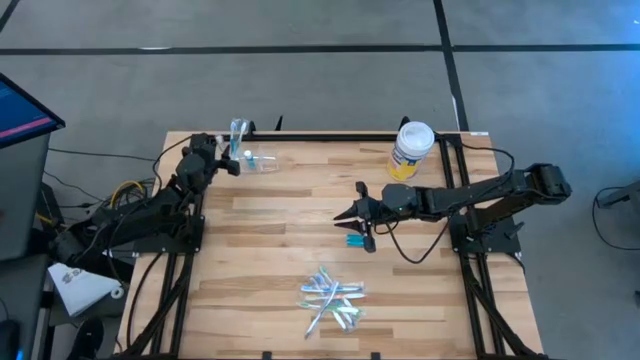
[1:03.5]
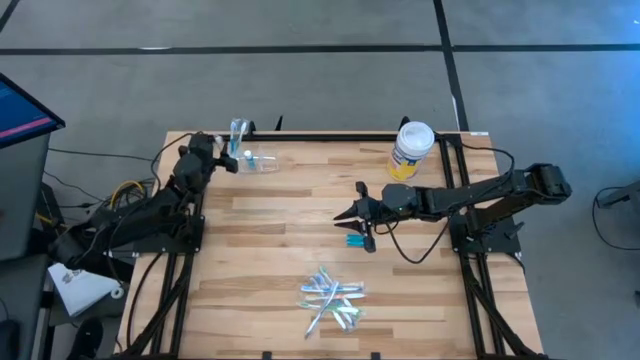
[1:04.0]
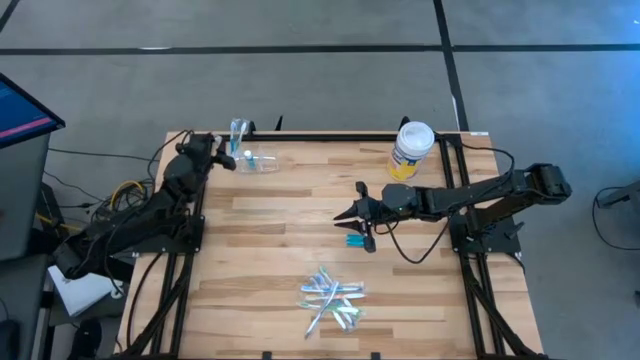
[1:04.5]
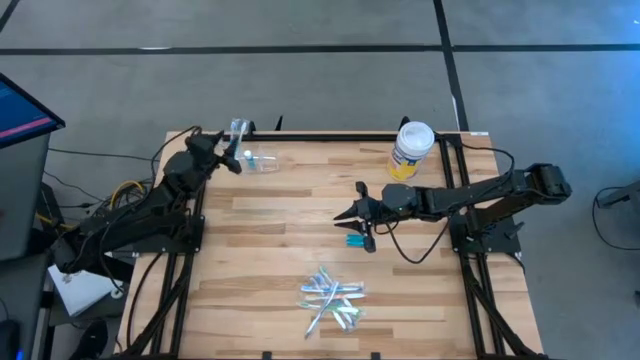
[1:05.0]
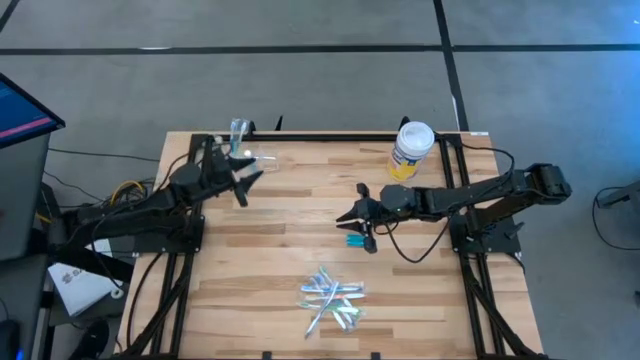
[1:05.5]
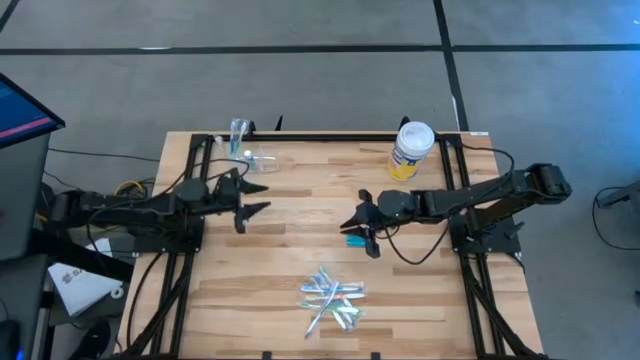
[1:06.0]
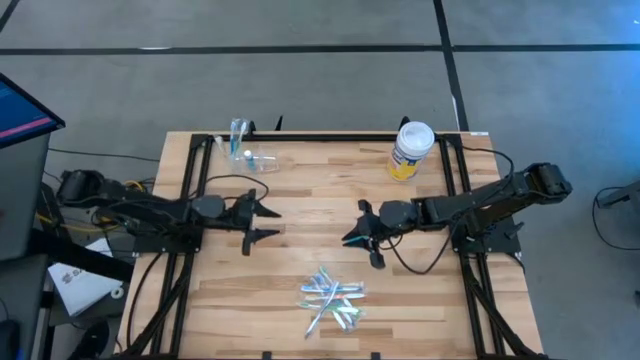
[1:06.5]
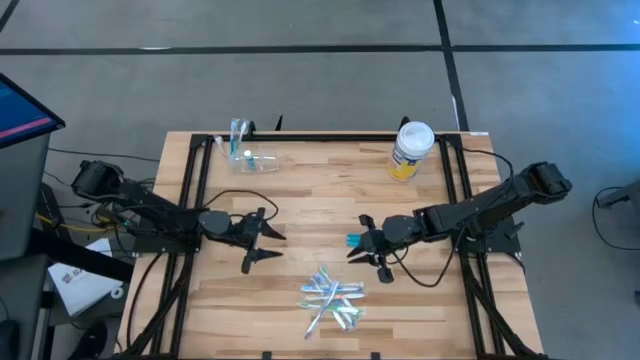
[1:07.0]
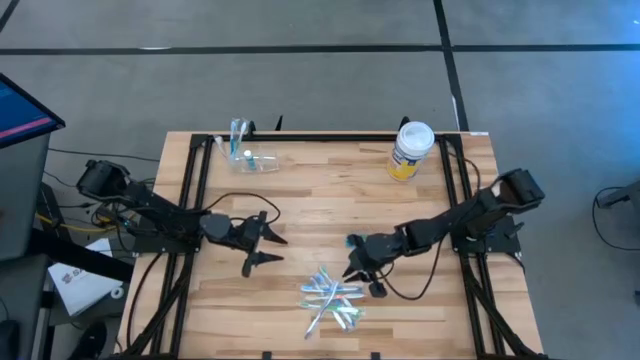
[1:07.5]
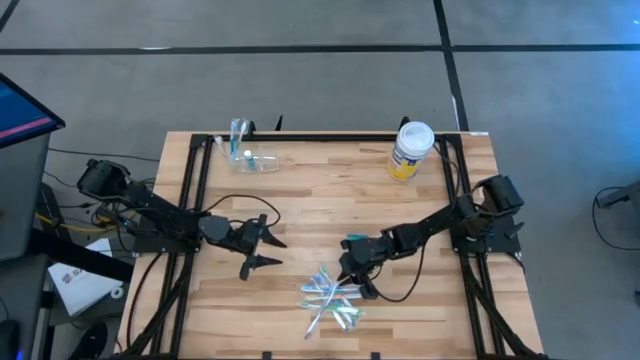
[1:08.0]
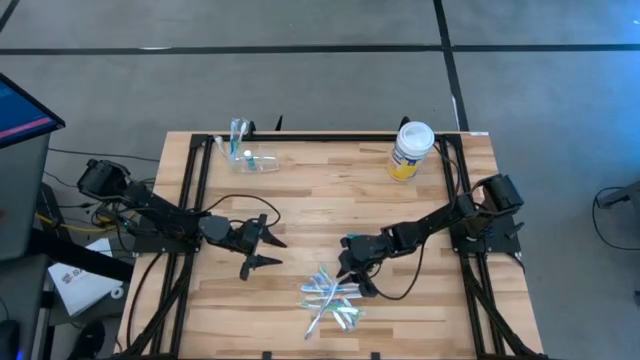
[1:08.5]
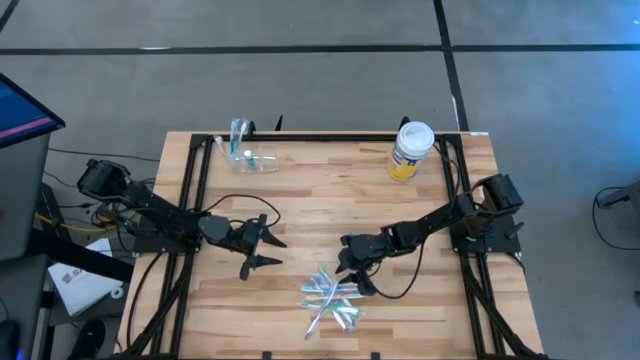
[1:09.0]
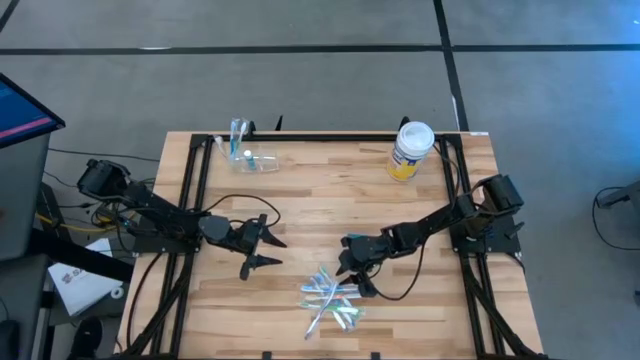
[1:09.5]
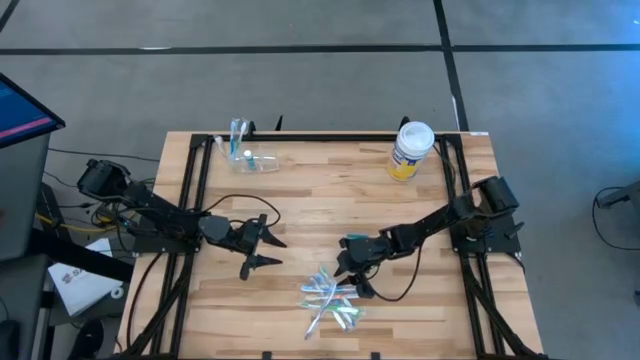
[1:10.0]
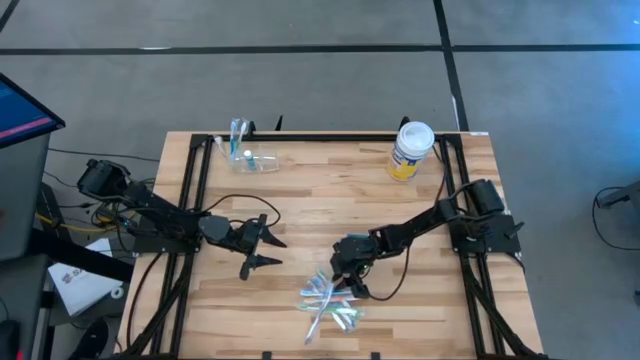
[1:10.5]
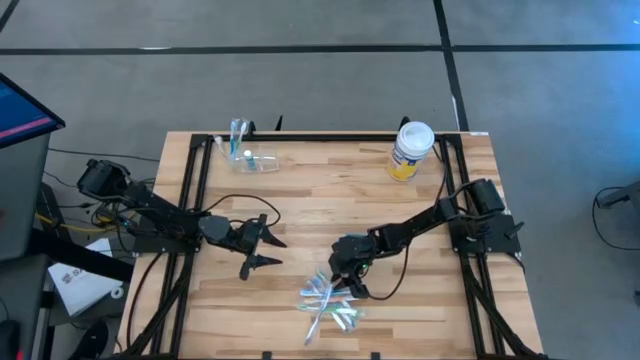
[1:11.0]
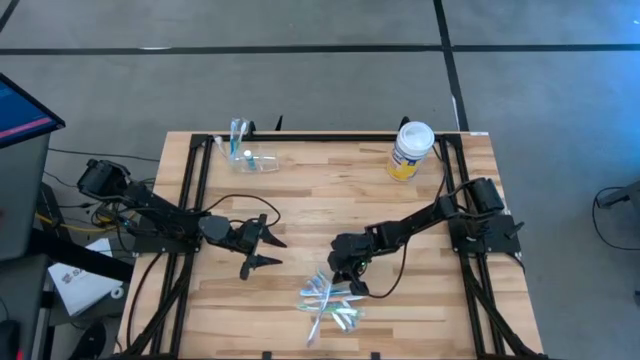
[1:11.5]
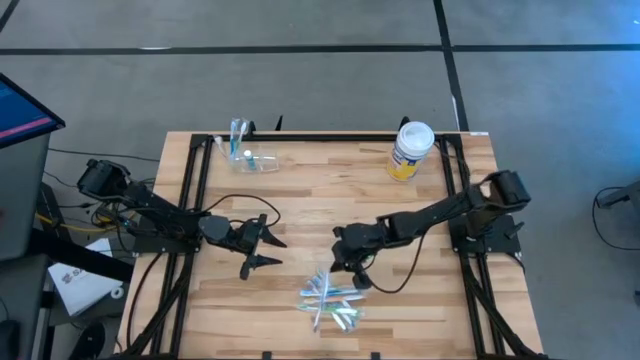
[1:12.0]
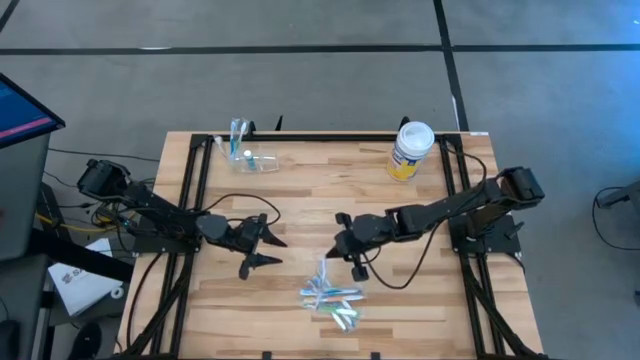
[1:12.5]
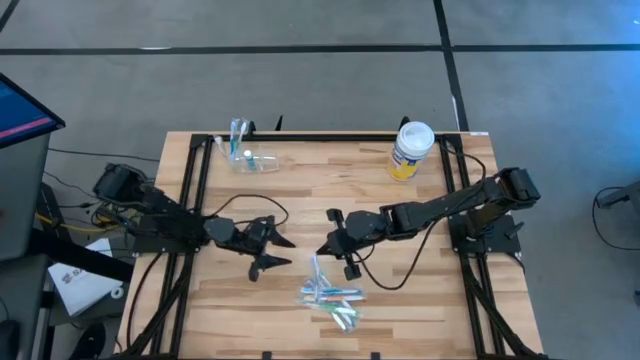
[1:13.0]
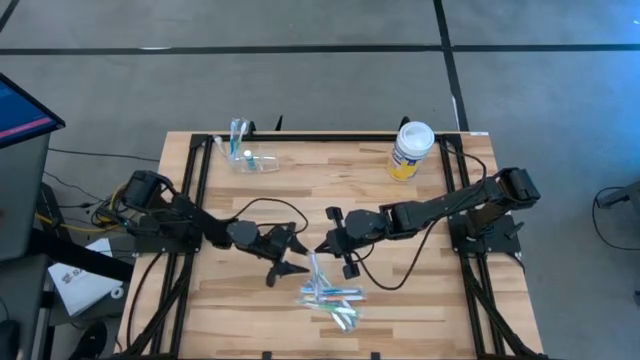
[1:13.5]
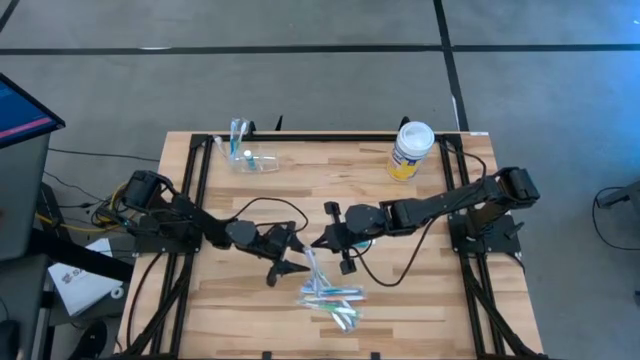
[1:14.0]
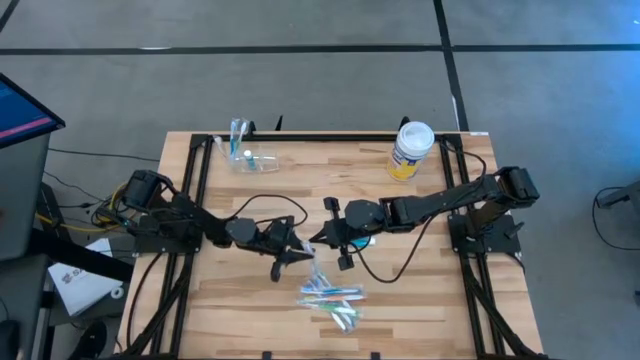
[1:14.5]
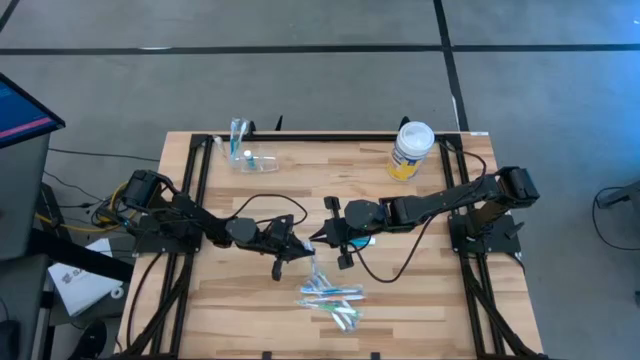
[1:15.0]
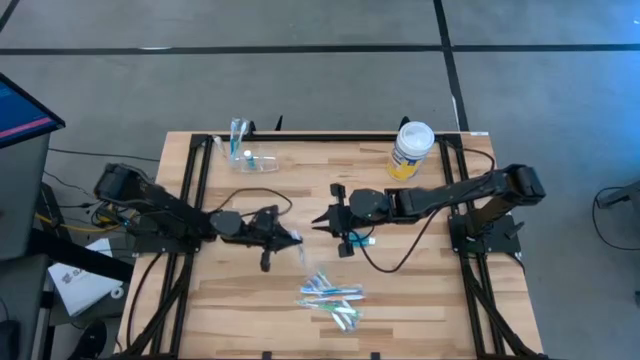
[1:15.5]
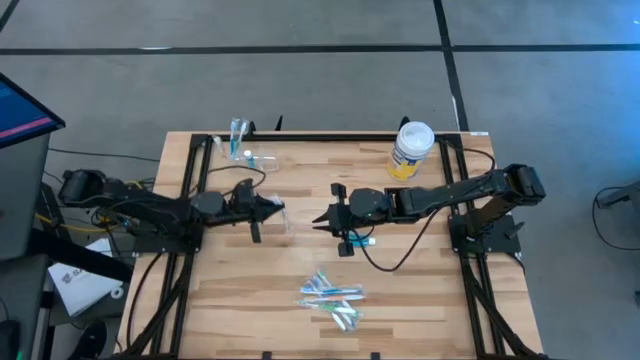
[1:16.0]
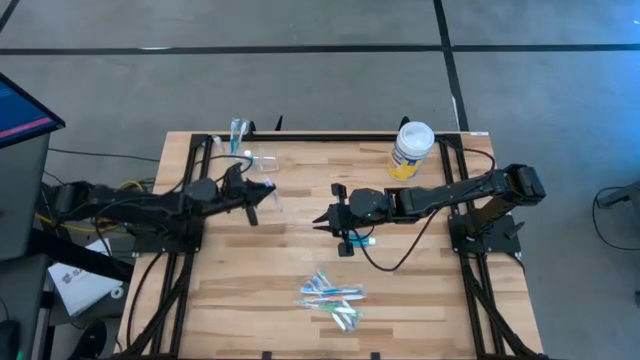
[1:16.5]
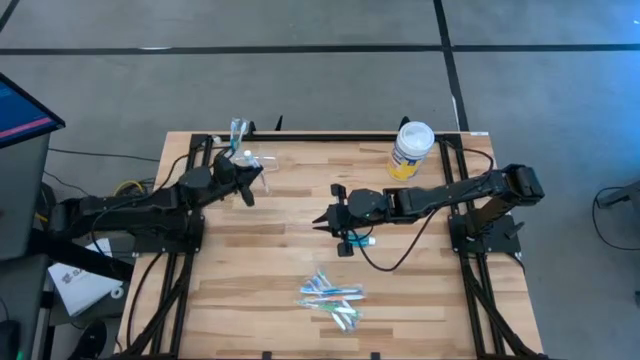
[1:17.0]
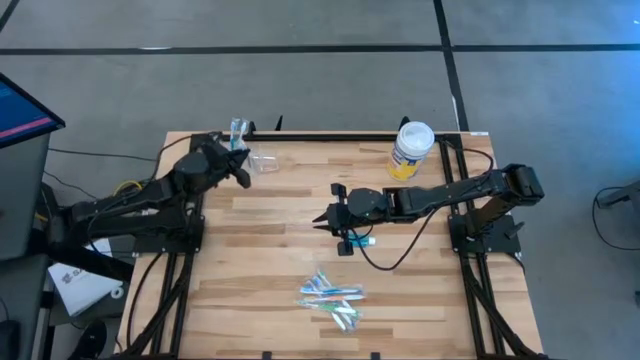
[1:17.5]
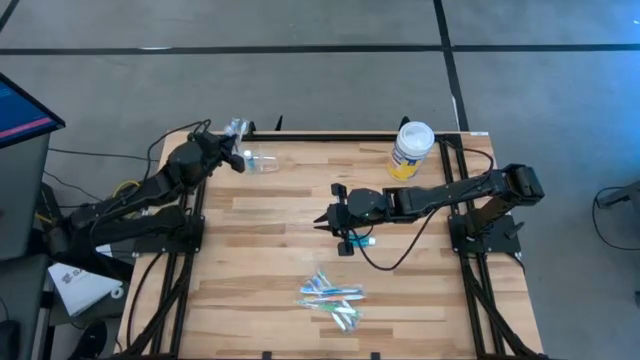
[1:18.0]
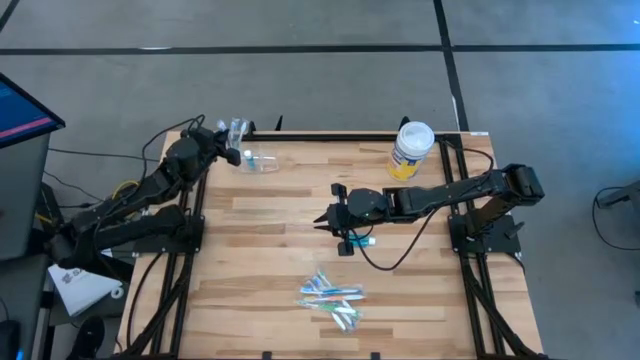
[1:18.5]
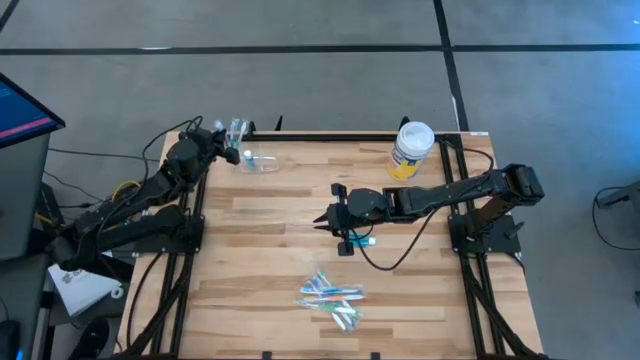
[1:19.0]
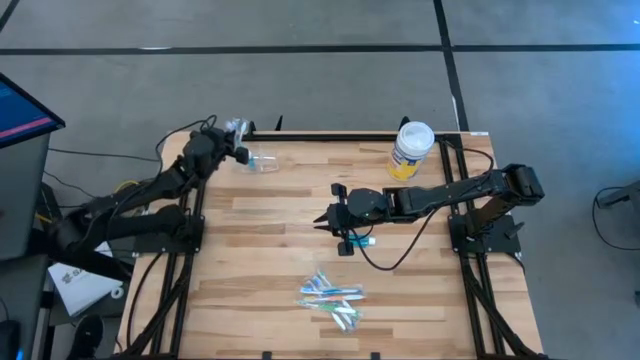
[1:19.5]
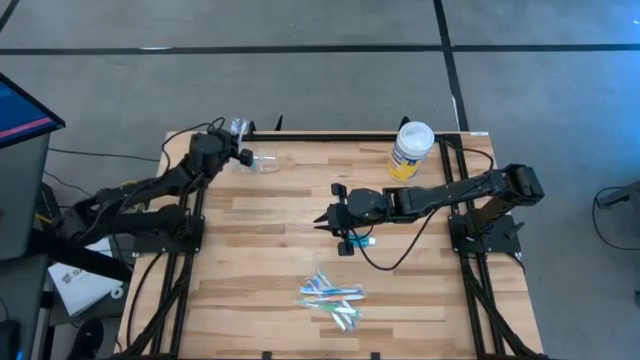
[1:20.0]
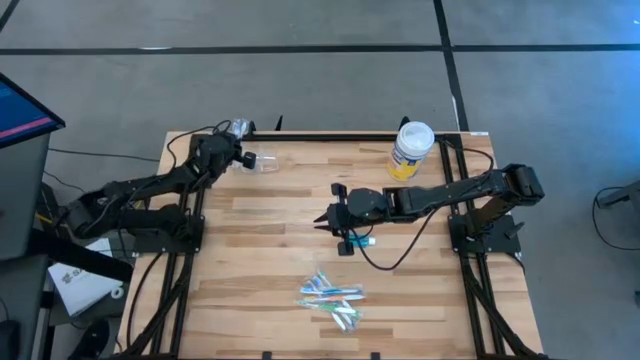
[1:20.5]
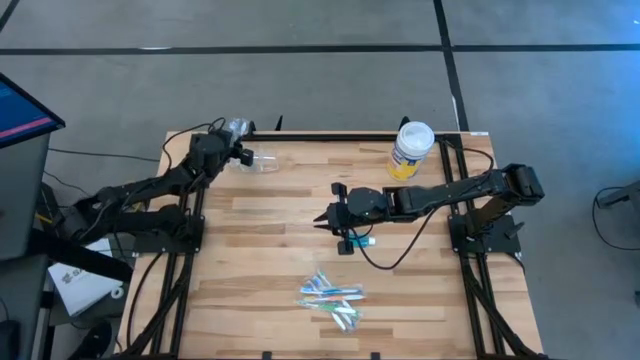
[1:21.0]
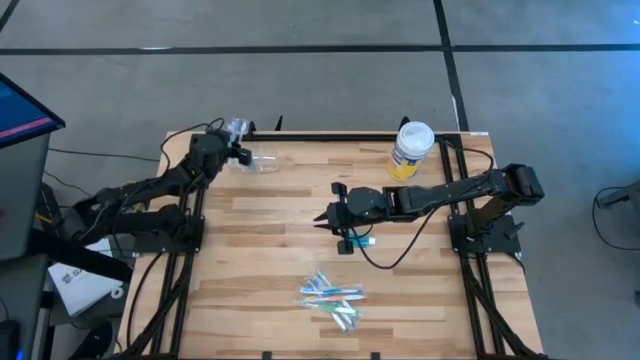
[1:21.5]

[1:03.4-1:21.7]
Task: Pick & Place toothbrushing station
Put the purple toothbrush into the transparent organizer
